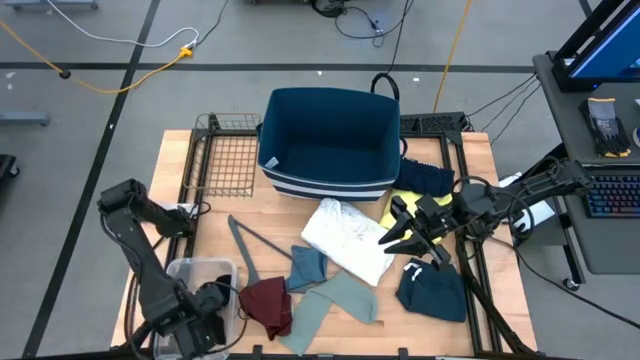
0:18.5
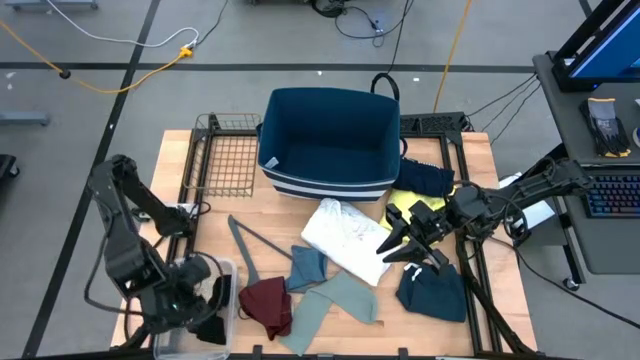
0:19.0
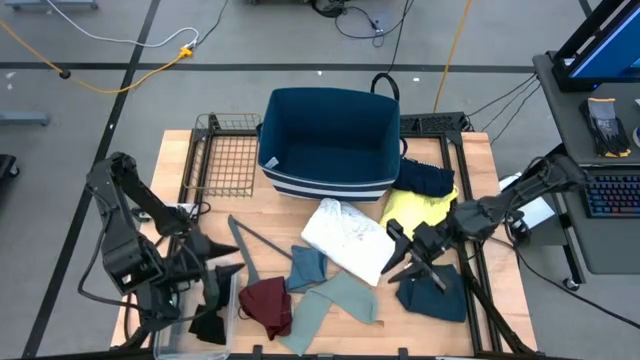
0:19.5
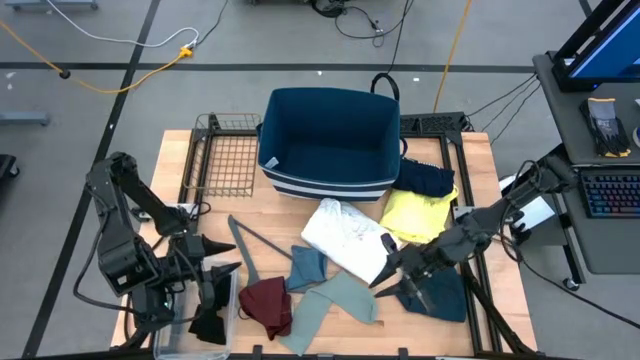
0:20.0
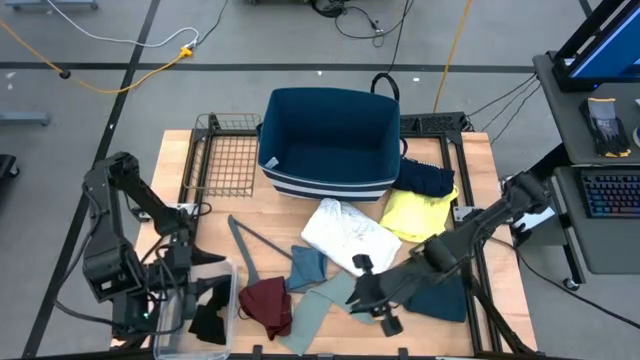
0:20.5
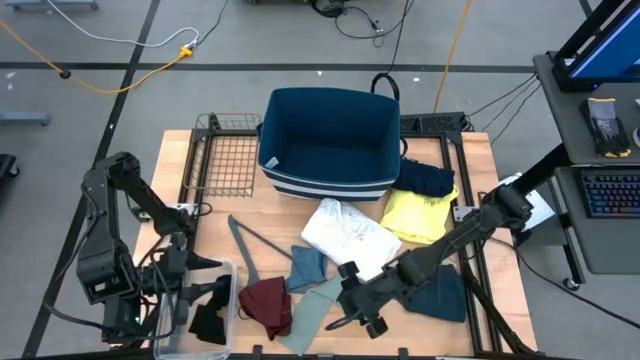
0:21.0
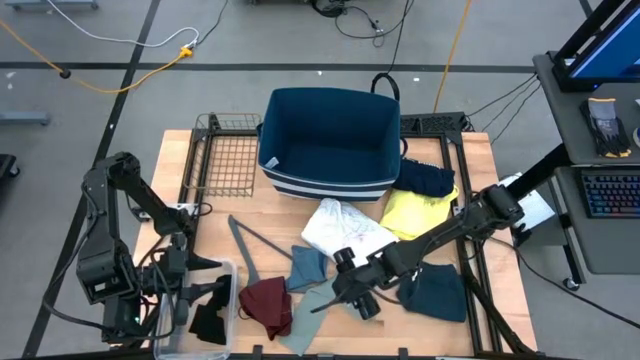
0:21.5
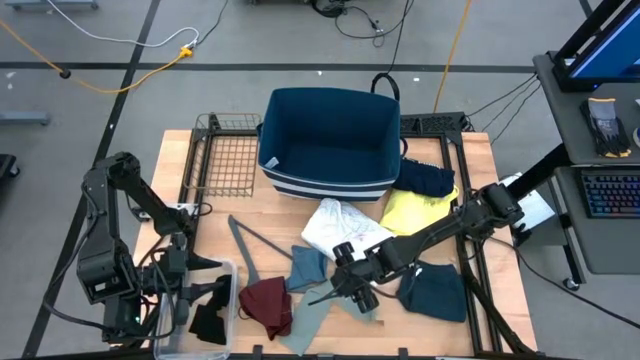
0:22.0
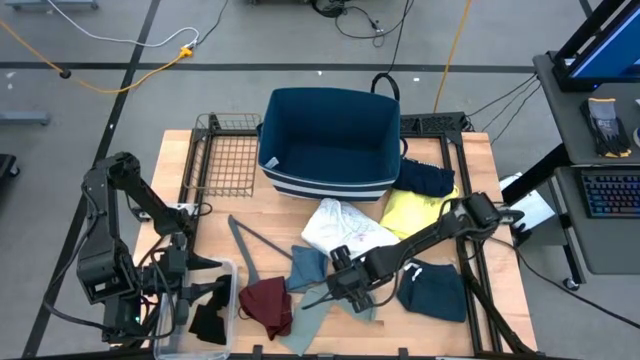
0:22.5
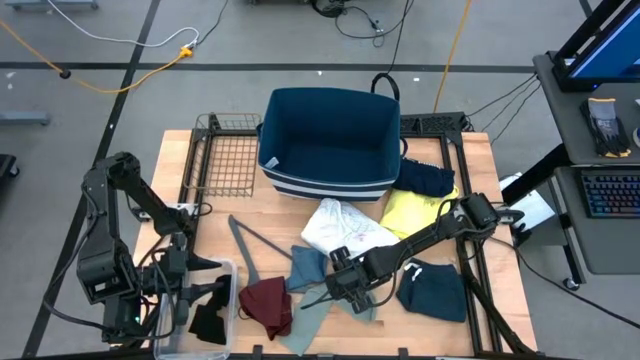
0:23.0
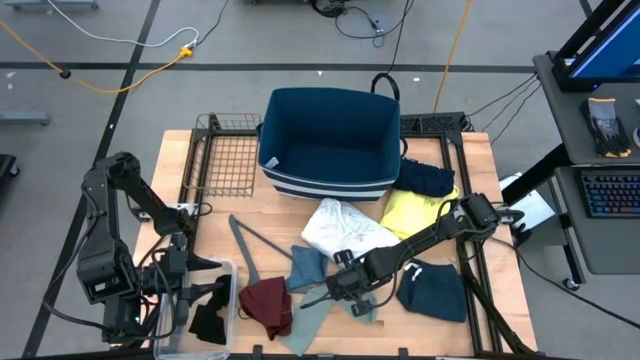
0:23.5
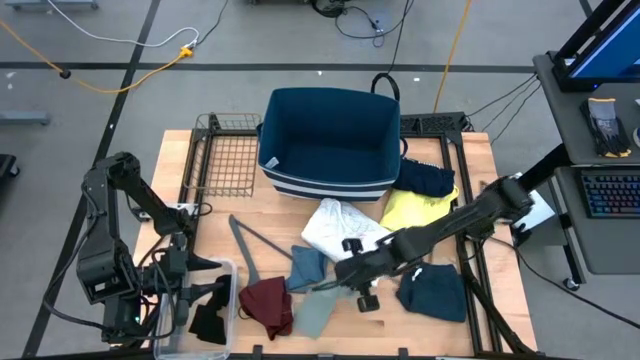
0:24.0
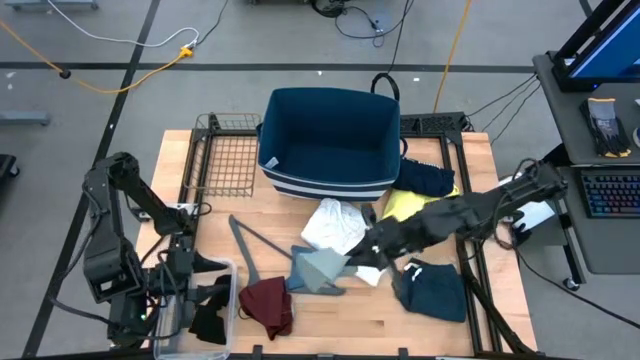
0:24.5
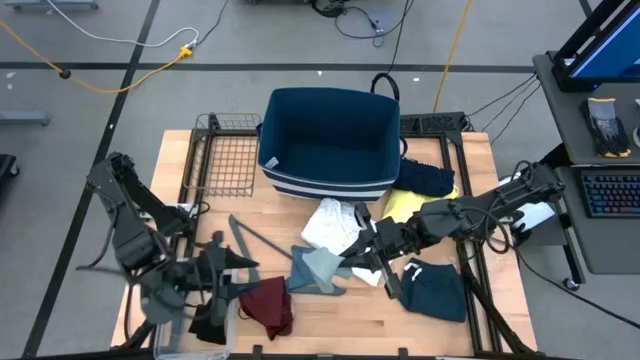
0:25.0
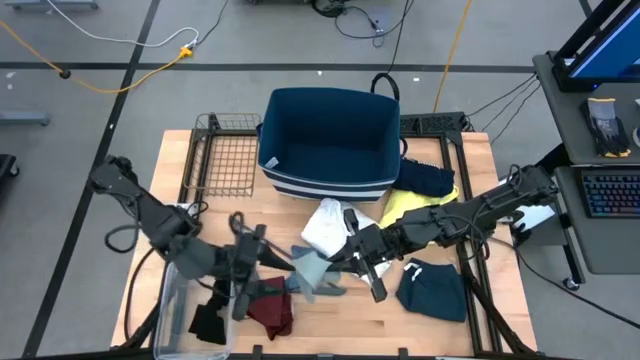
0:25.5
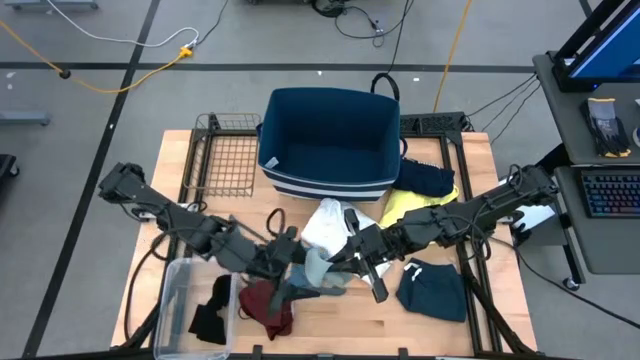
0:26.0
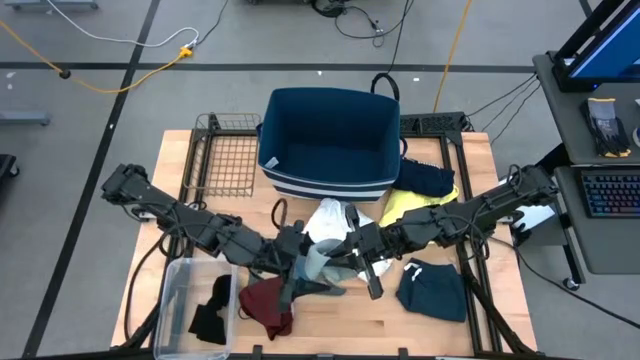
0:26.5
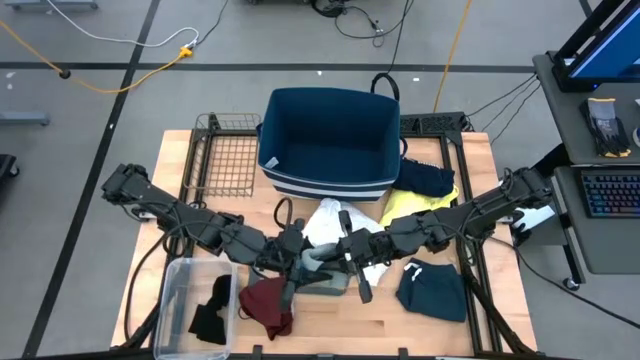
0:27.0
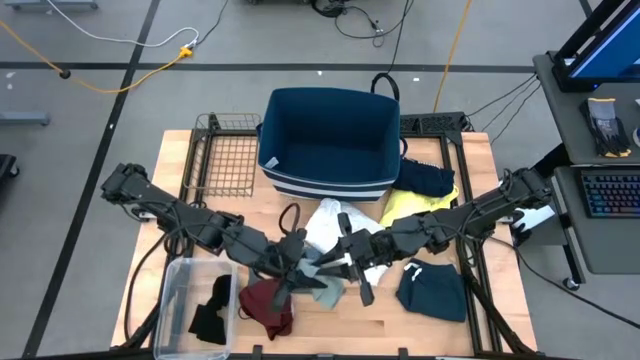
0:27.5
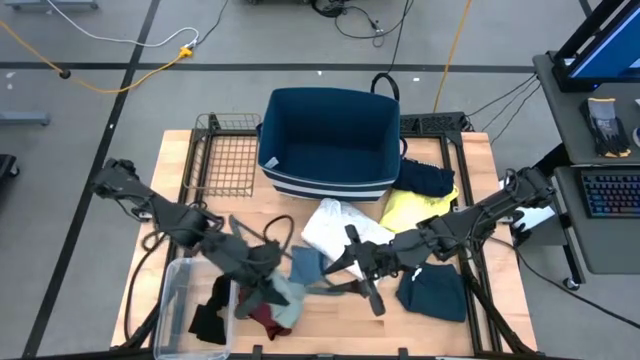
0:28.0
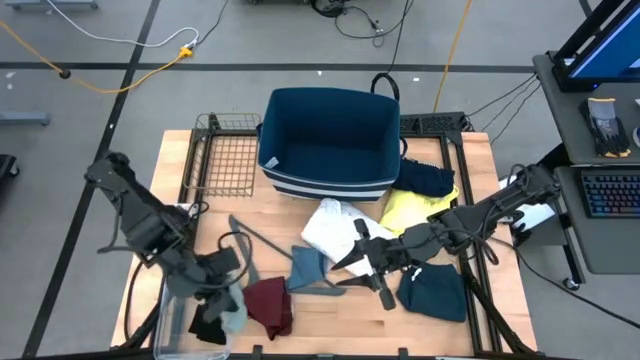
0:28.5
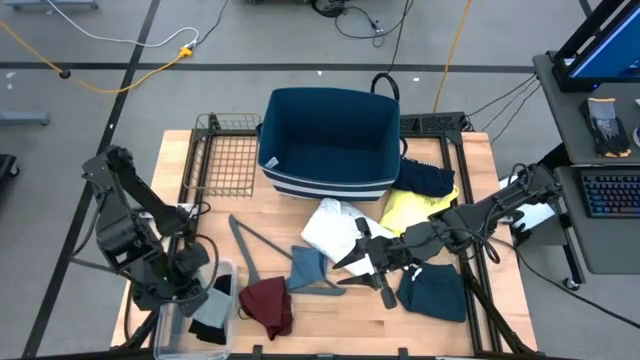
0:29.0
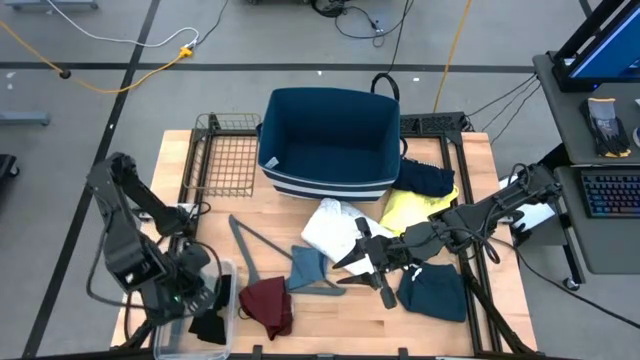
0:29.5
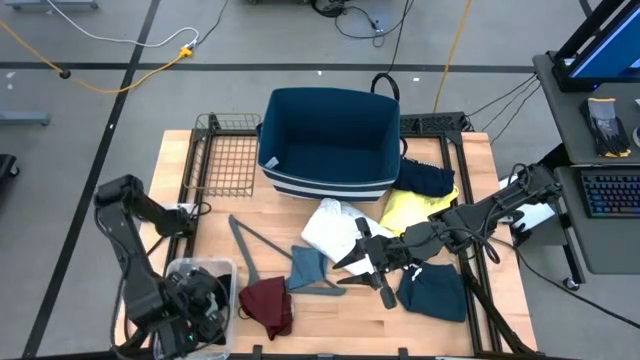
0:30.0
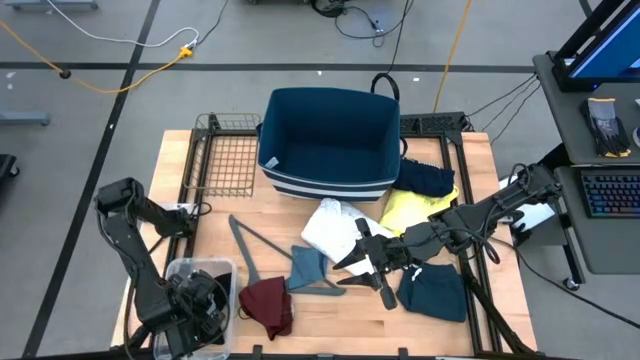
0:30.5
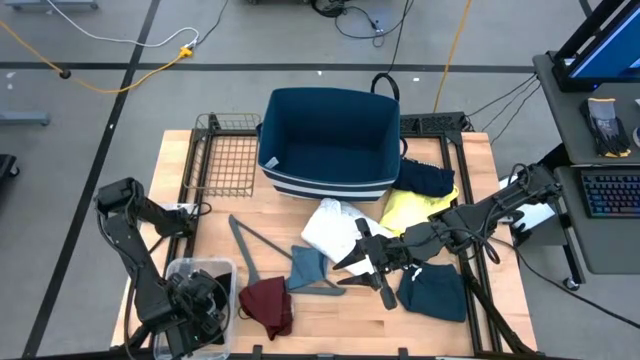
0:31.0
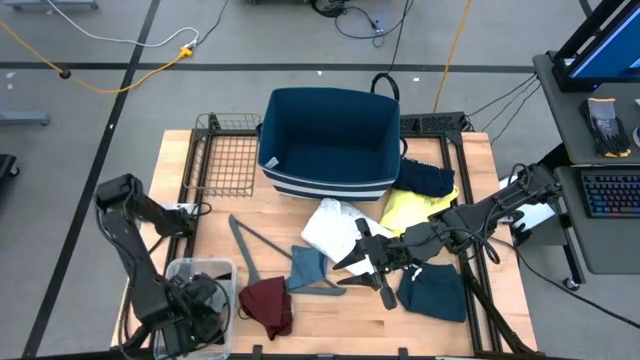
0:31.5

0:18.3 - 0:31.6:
Task: Pick & Place Cloths
Put the gray sock into the transparent bin

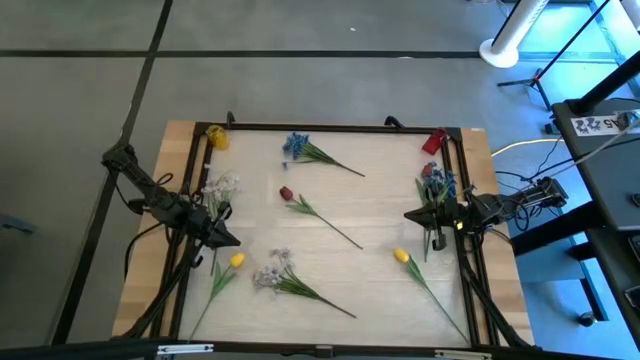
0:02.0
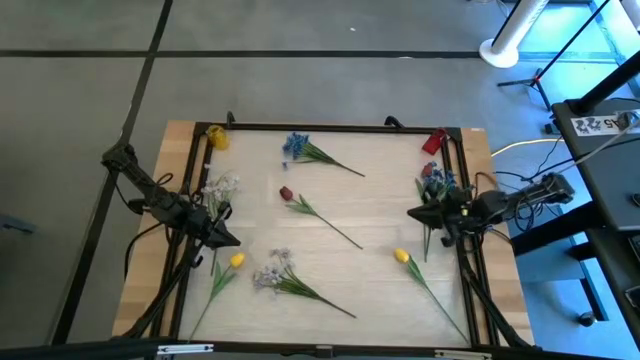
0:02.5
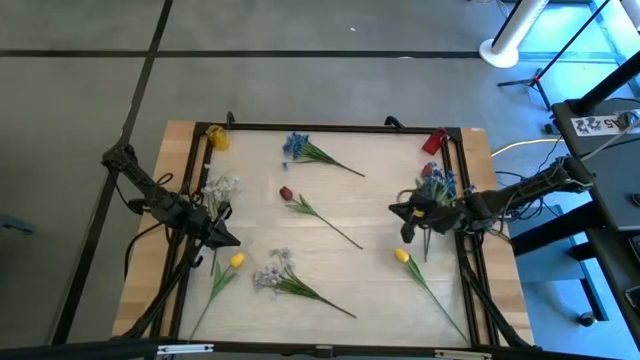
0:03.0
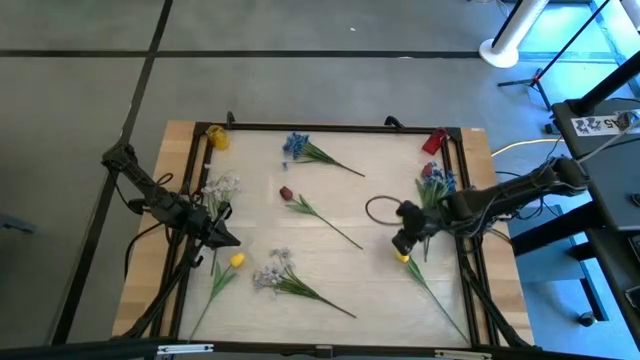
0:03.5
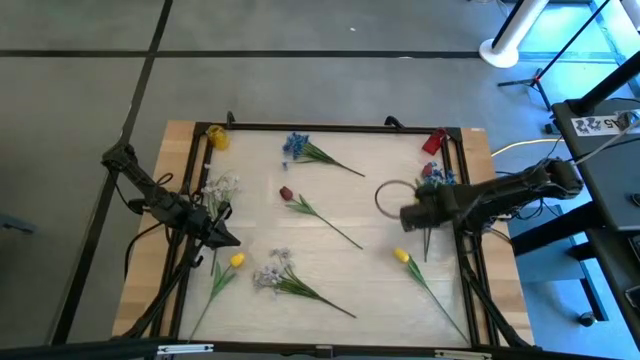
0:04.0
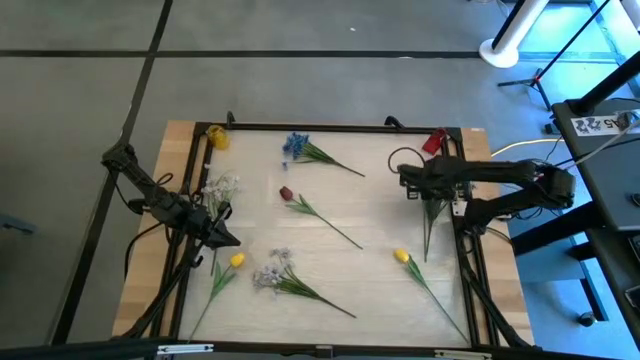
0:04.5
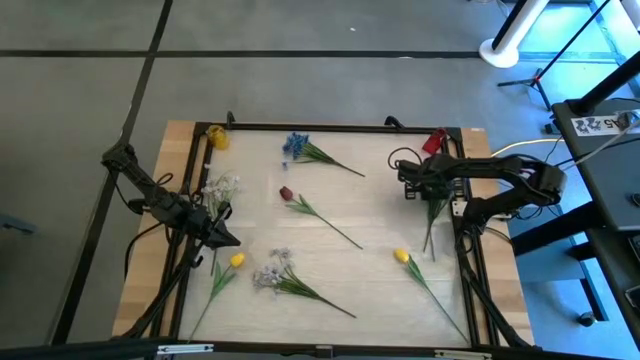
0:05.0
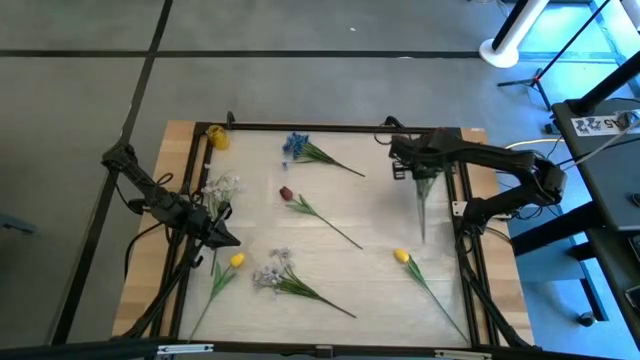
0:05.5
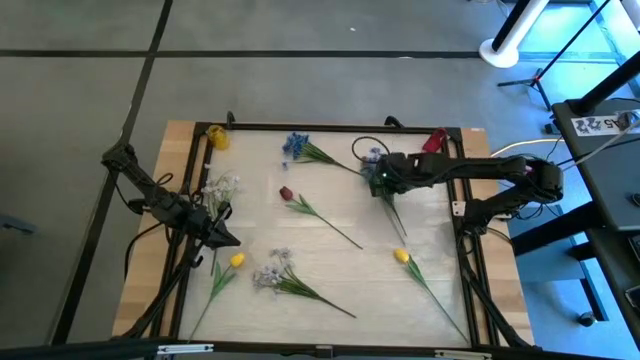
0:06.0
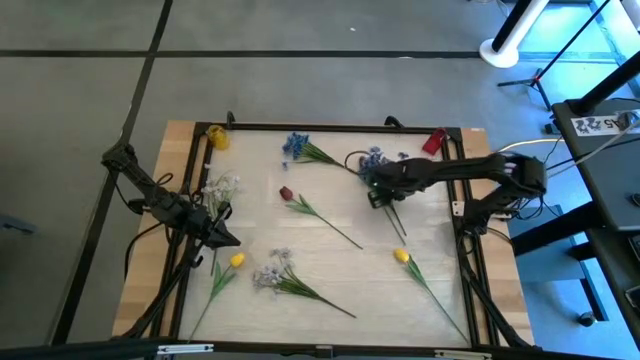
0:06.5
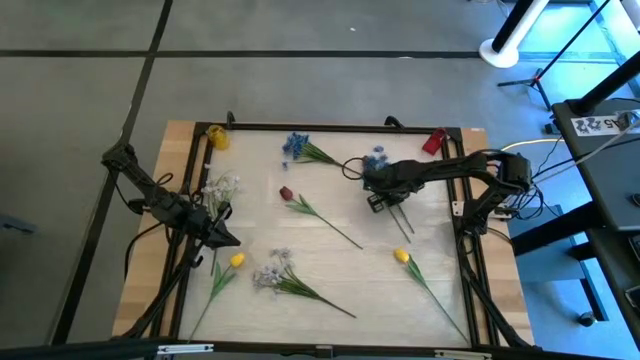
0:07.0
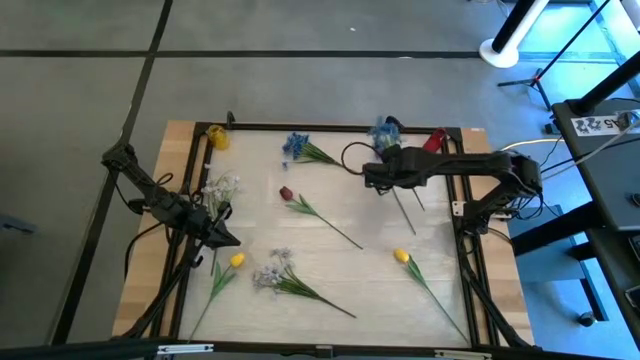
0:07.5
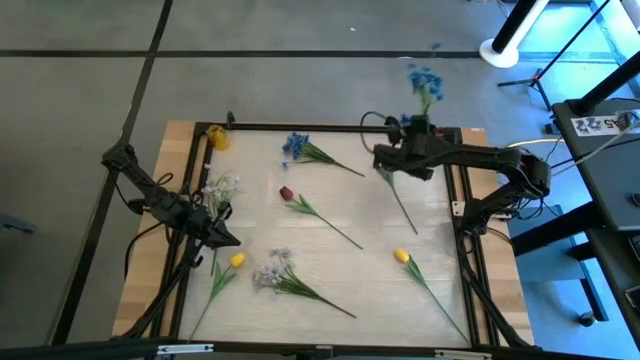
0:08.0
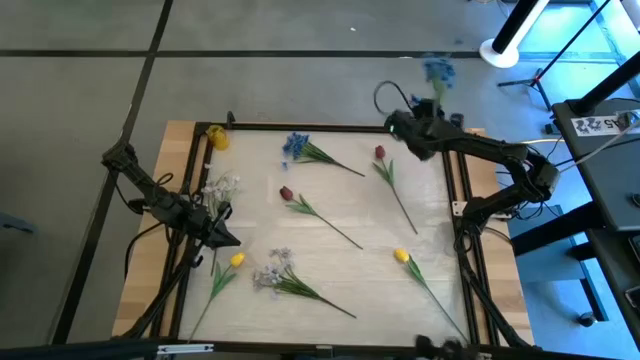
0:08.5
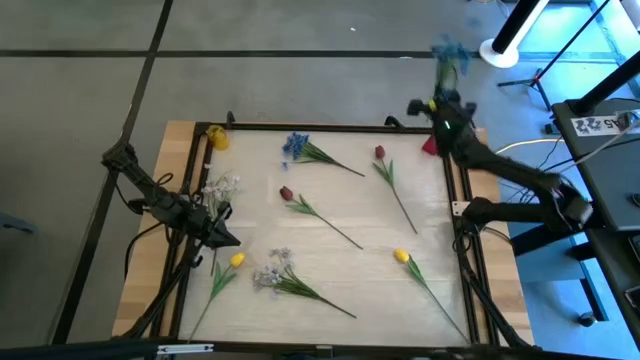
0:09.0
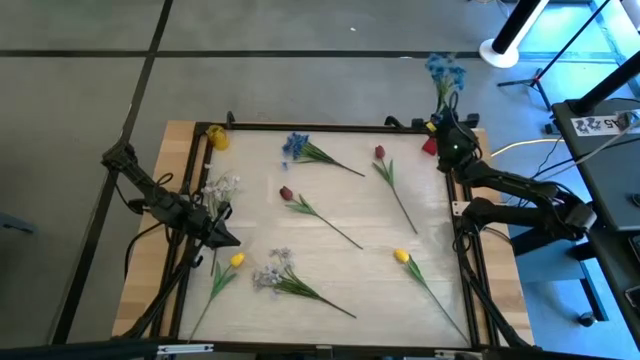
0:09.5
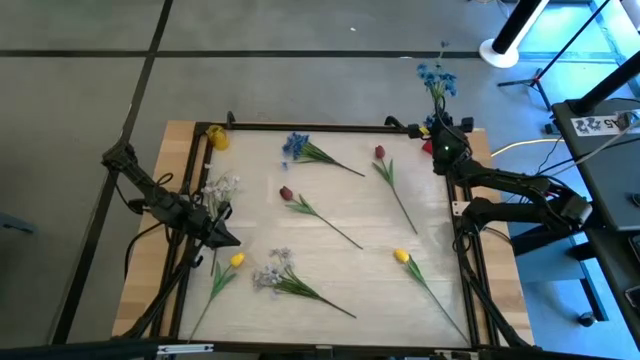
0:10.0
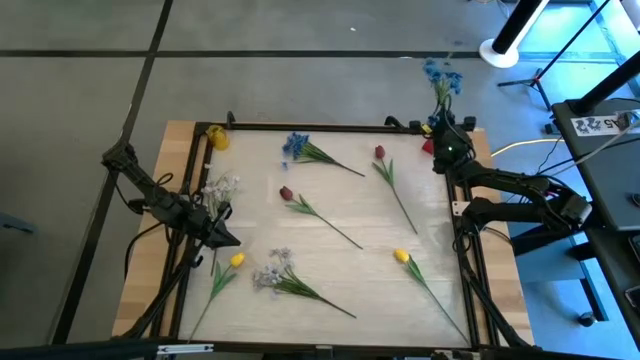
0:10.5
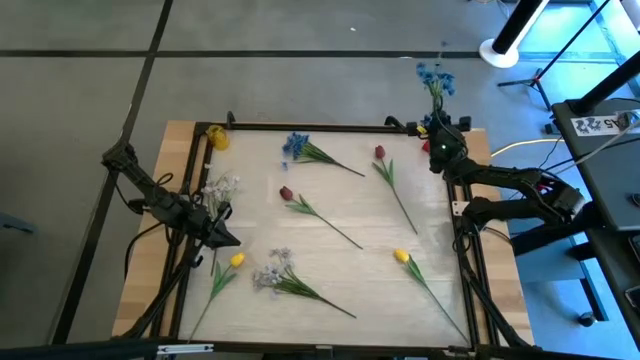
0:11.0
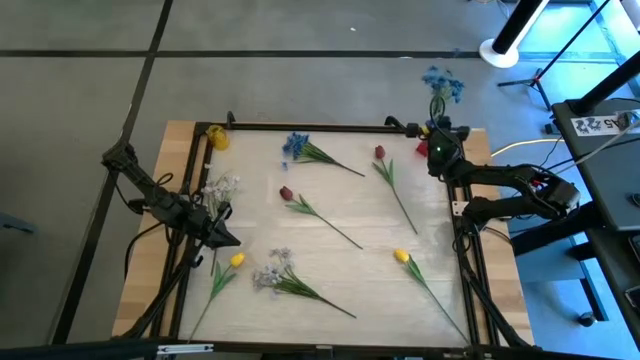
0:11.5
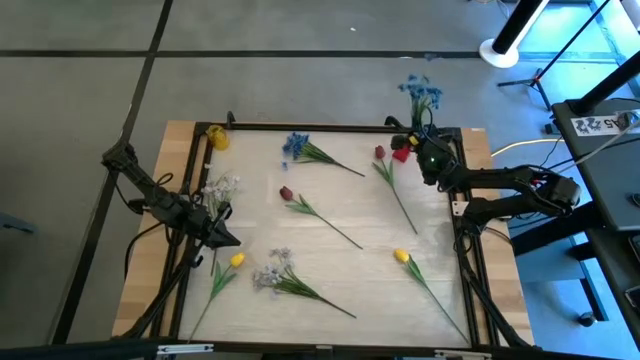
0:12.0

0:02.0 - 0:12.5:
Task: Sort flowers into vase by color
Put the bottom blue flower into the red vase
